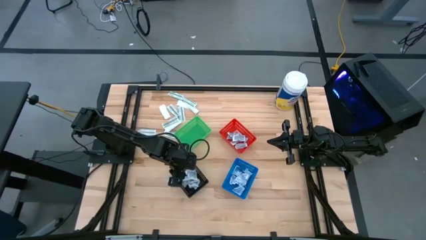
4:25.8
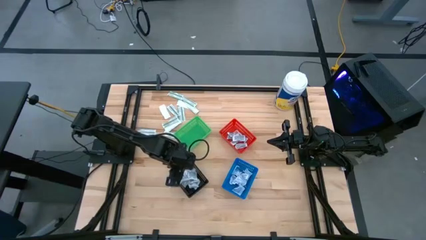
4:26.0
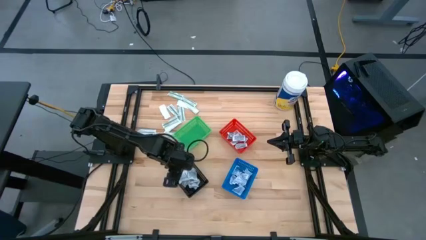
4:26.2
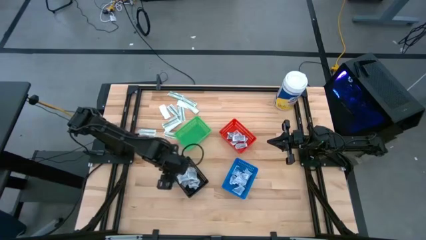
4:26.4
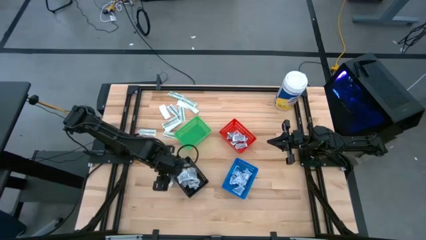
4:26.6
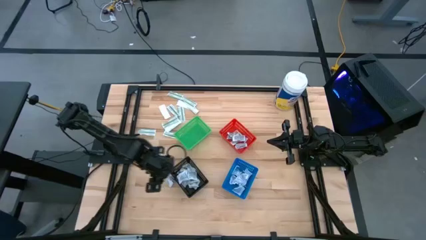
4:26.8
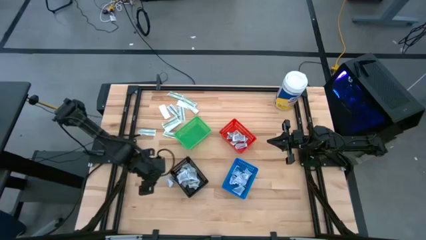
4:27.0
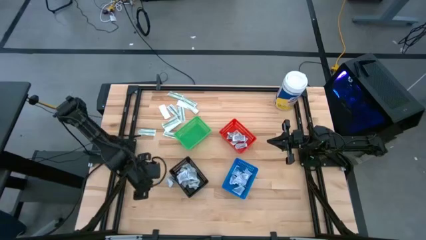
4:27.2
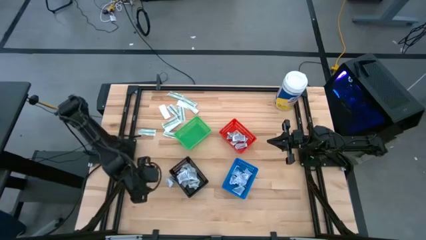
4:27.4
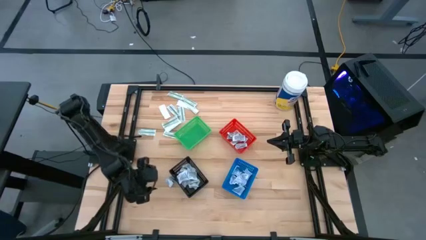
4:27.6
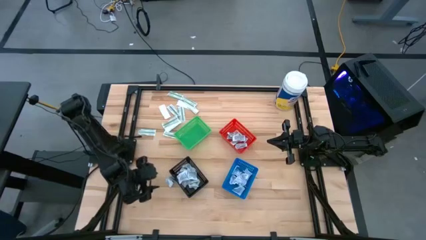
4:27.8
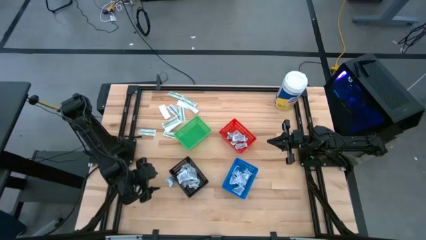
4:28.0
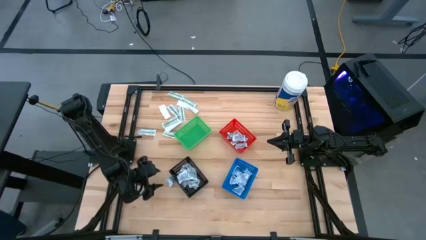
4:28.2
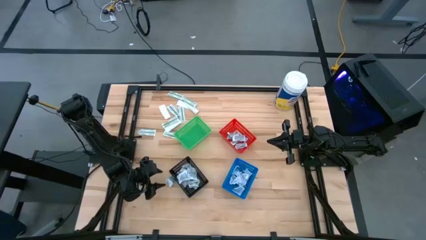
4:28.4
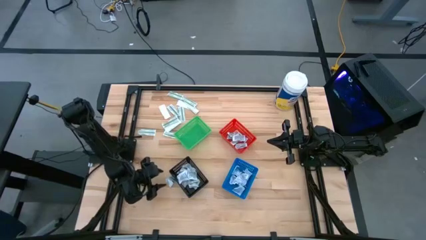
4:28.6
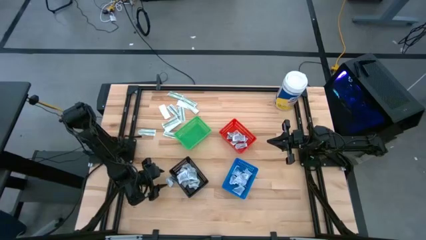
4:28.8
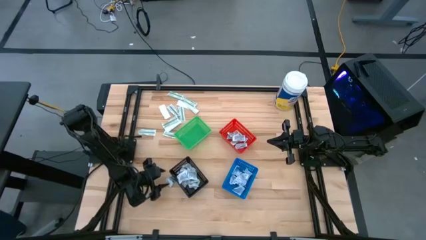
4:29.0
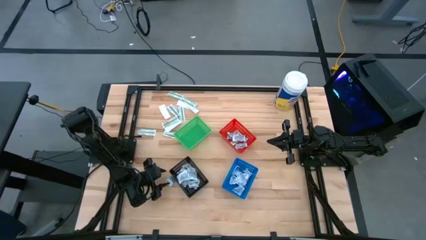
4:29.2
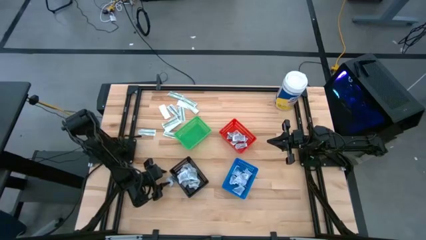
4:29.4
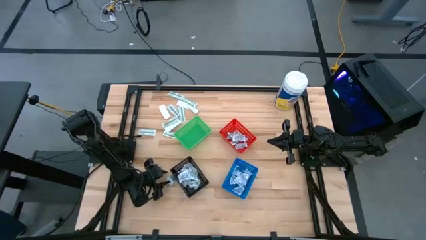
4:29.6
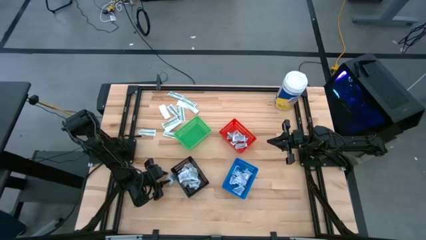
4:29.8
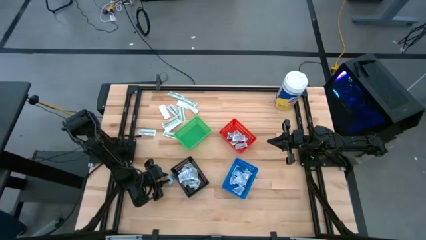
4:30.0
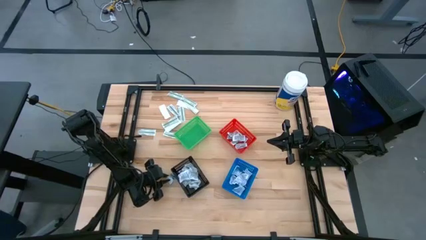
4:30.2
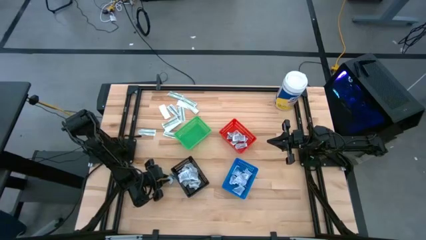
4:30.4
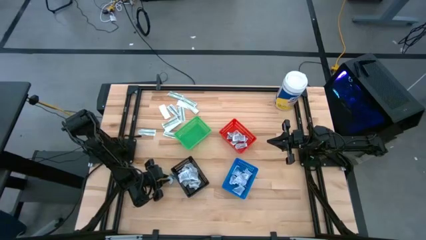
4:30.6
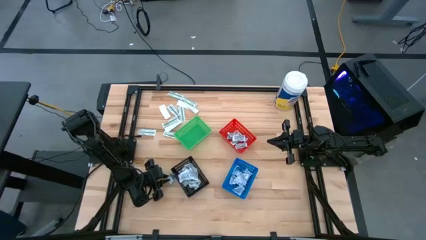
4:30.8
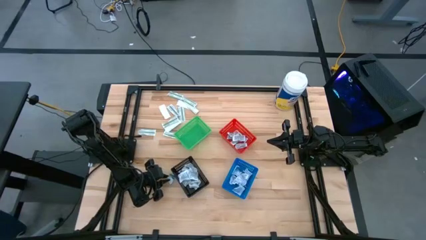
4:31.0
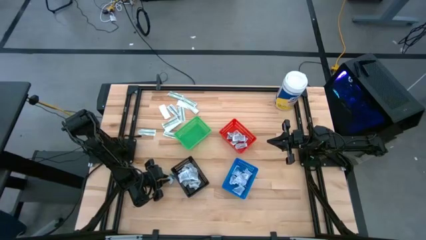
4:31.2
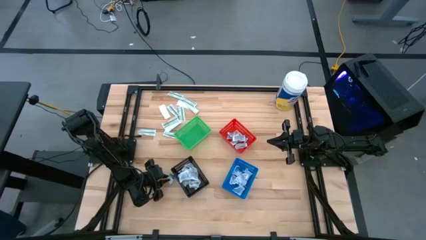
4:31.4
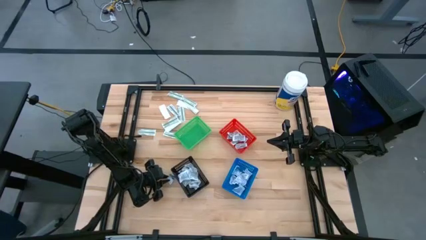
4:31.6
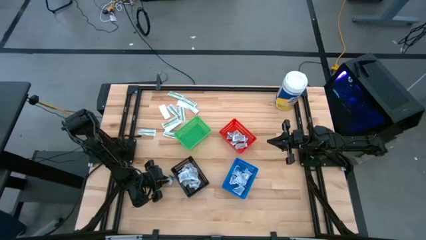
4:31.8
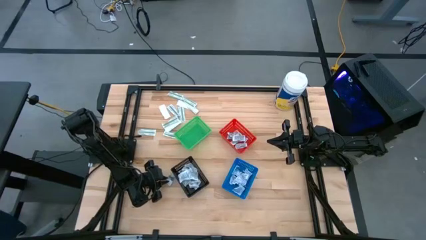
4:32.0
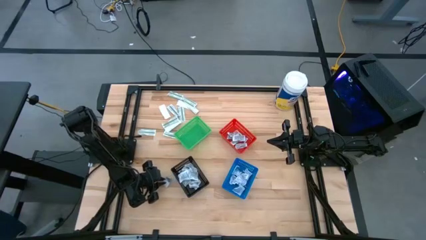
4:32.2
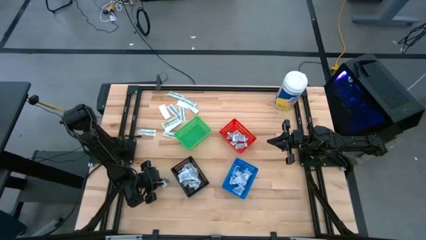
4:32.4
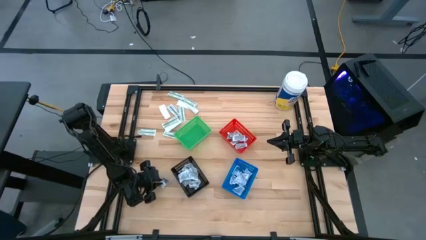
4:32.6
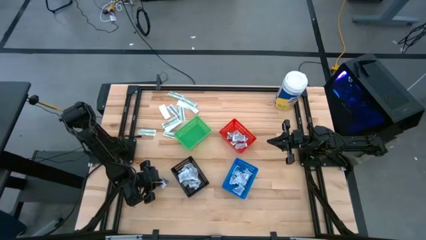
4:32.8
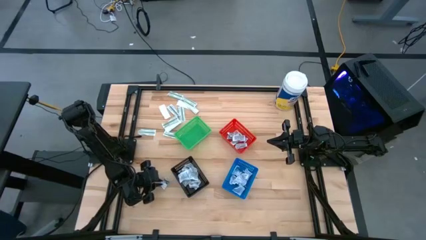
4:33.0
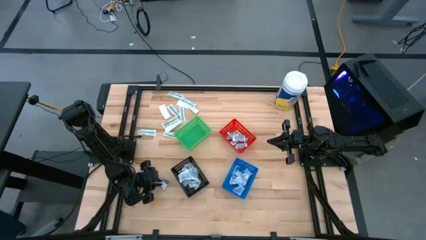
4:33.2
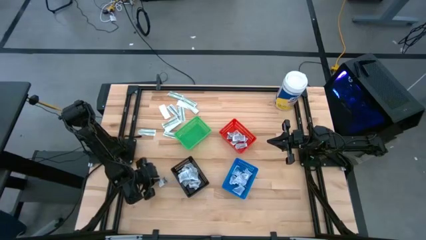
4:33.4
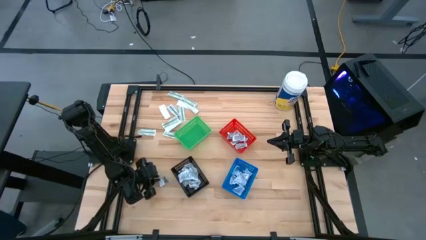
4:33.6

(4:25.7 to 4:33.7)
Task: Pick & Place First Aid Supplies
Put the black towelette pack into the black bin

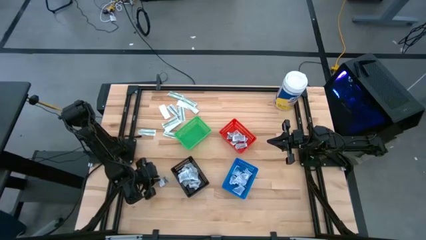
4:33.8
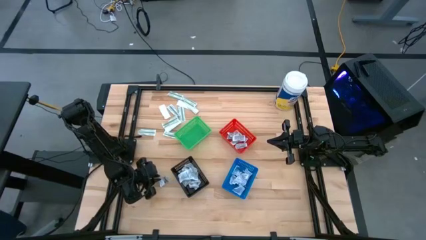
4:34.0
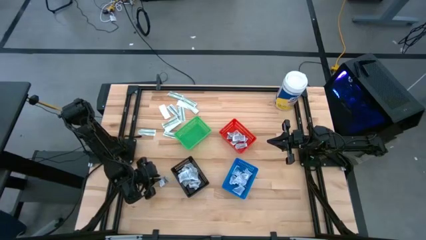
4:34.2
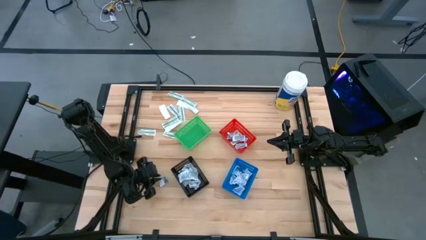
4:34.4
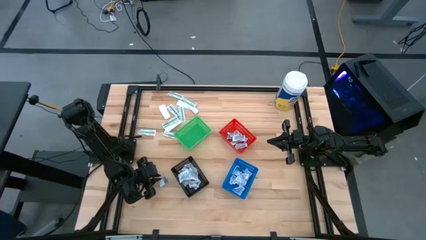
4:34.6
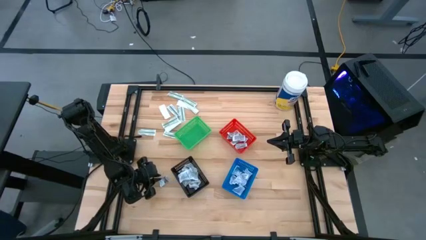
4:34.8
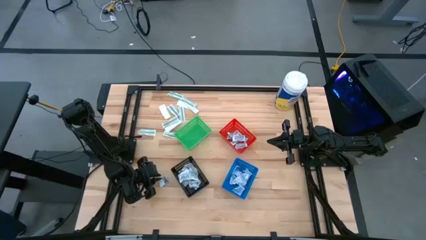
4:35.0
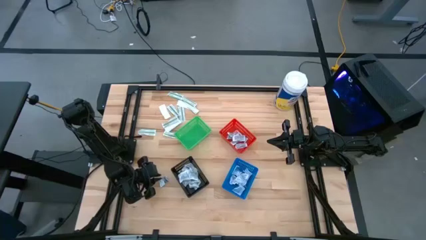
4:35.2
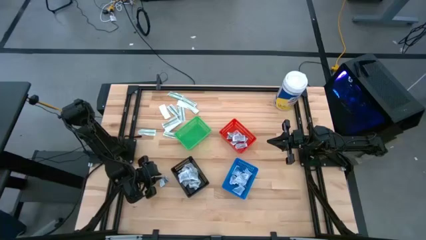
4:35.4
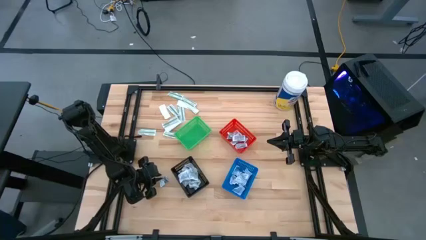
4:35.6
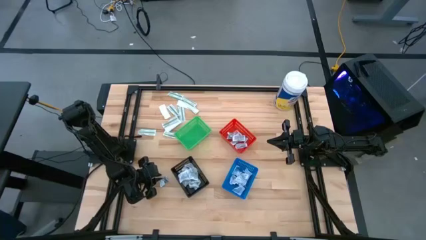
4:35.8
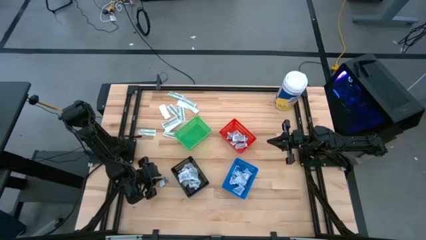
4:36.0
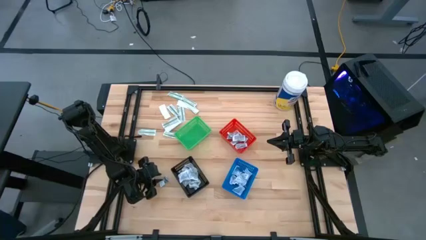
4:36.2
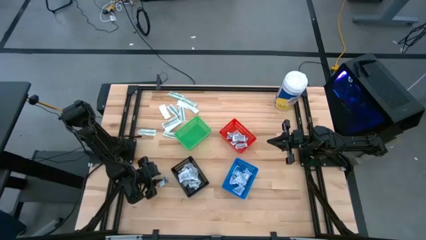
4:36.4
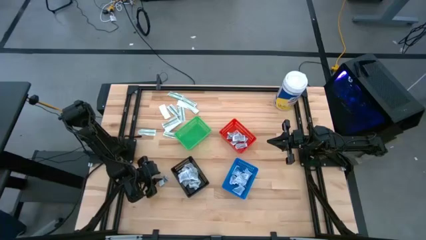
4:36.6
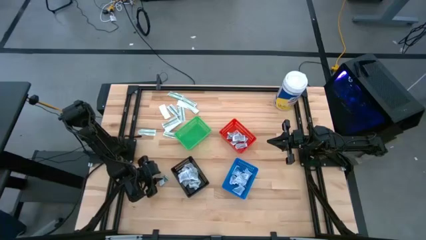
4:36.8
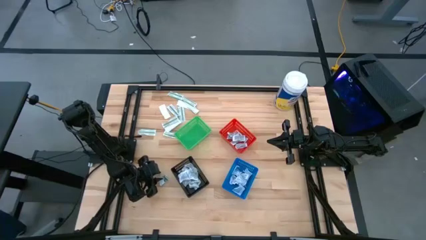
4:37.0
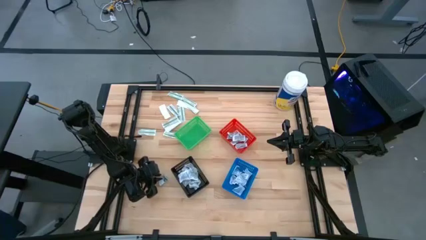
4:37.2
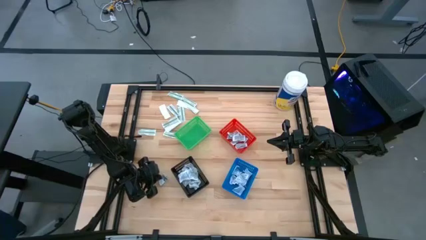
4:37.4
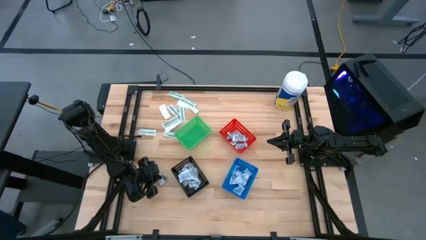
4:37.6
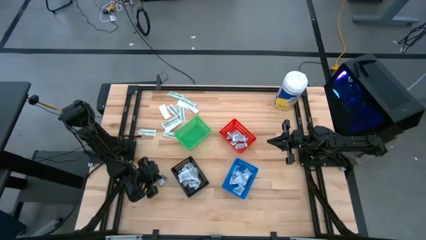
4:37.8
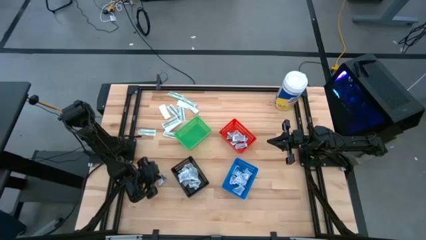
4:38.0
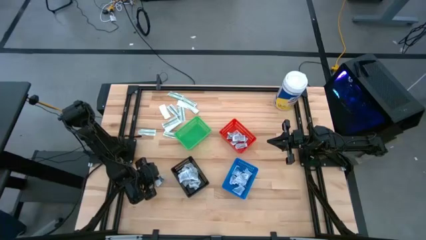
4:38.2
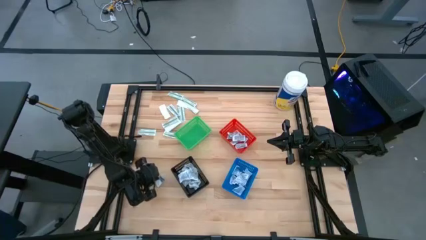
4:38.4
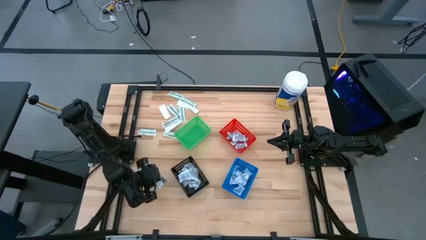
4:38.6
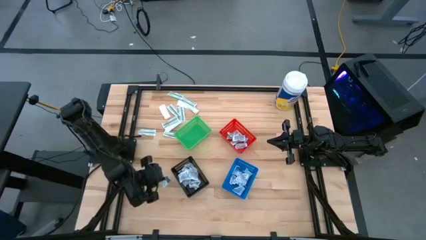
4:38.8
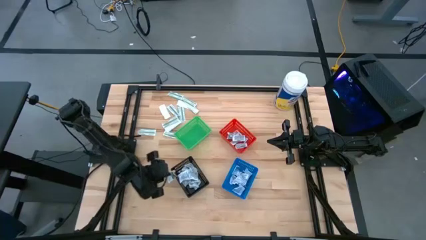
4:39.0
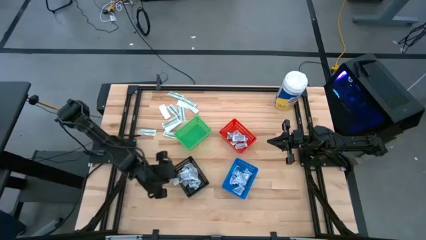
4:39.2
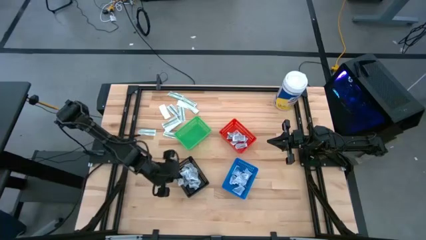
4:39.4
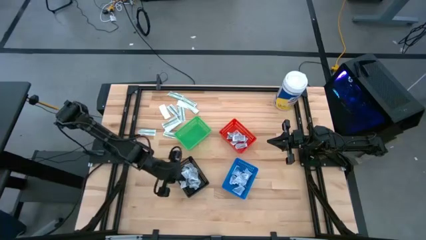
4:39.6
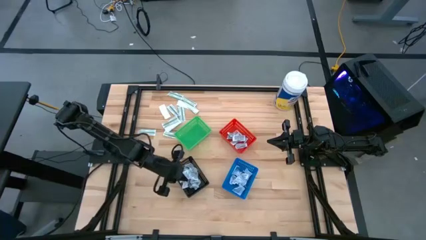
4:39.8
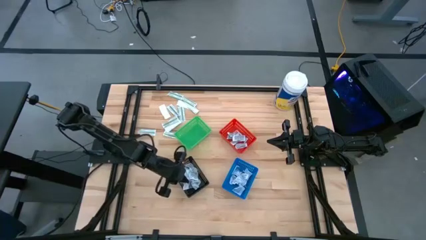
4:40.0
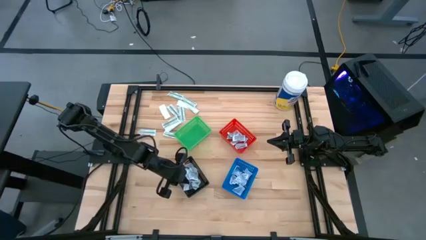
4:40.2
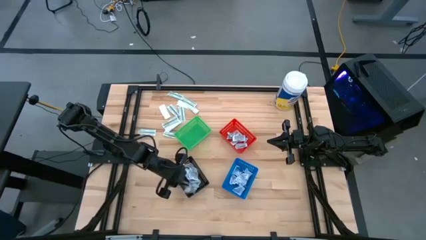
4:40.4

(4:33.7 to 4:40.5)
Put the black towelette pack into the black bin
